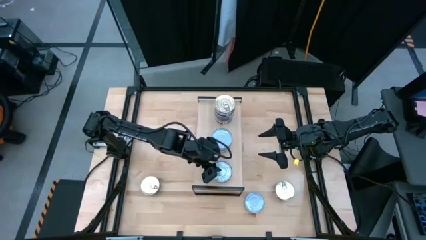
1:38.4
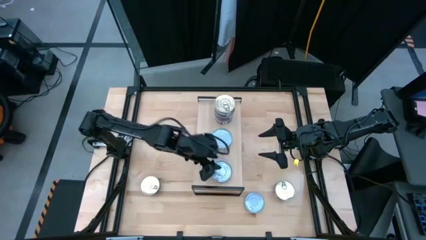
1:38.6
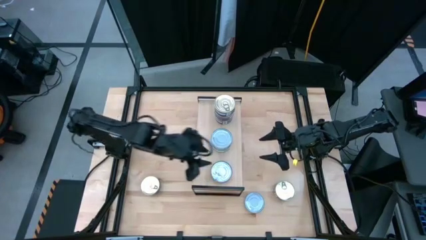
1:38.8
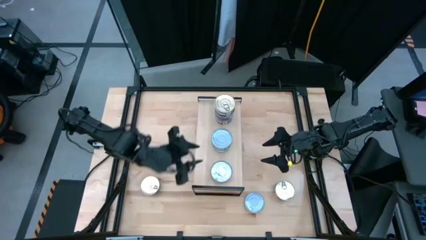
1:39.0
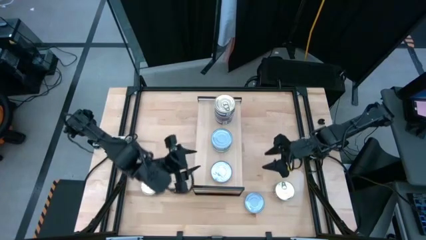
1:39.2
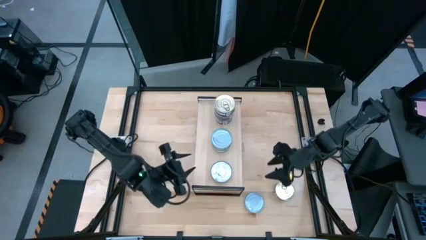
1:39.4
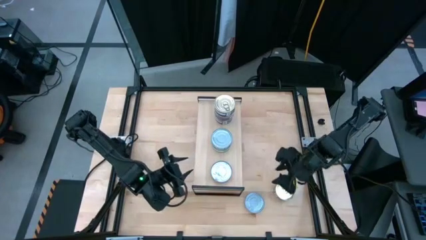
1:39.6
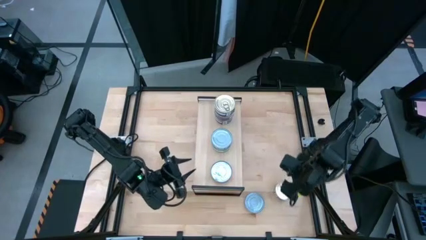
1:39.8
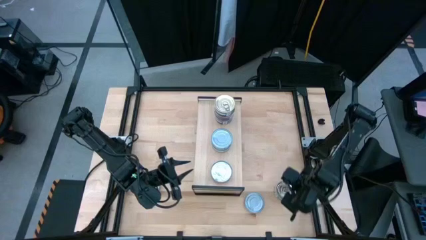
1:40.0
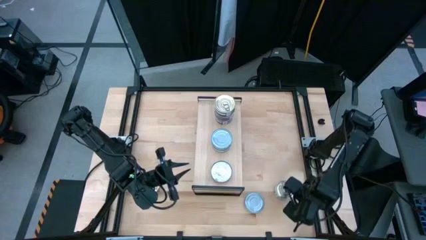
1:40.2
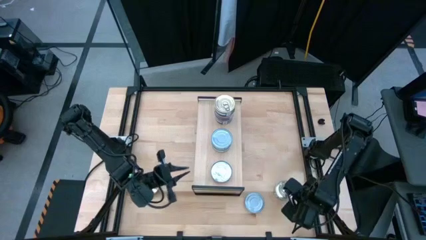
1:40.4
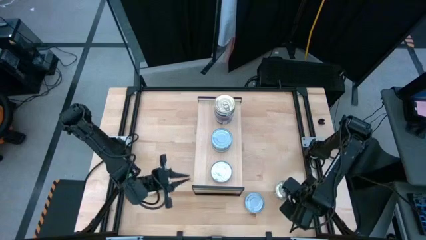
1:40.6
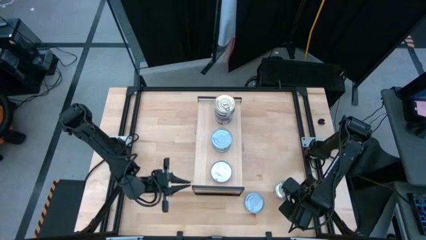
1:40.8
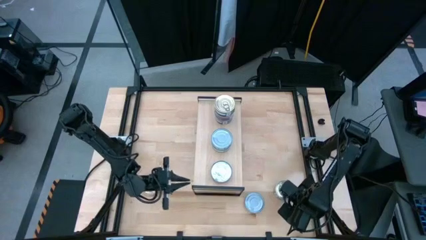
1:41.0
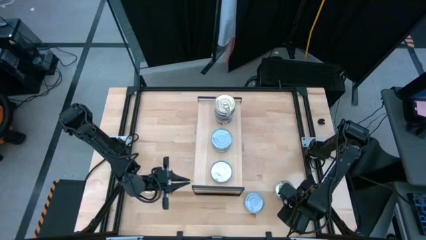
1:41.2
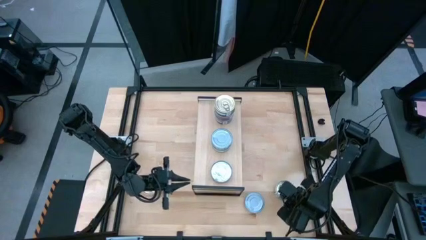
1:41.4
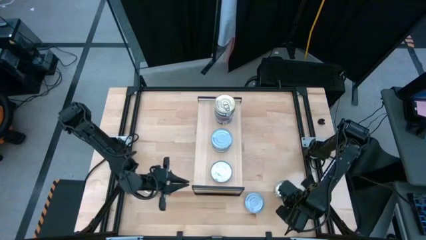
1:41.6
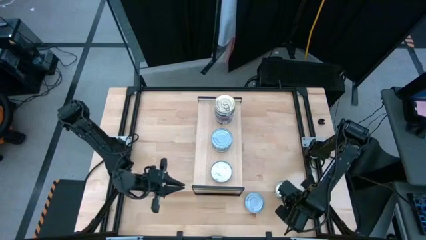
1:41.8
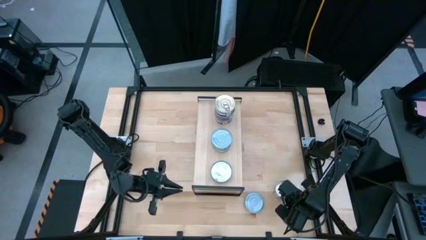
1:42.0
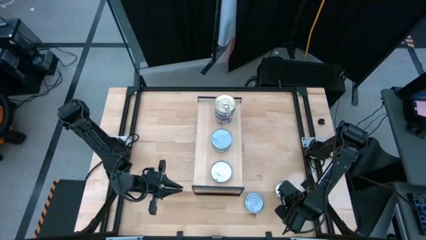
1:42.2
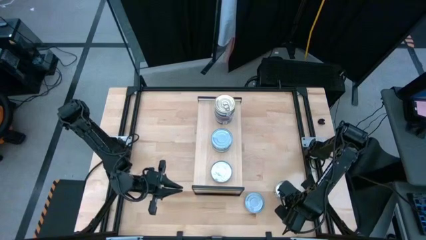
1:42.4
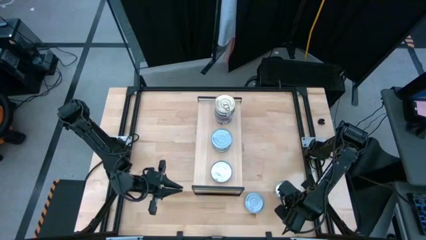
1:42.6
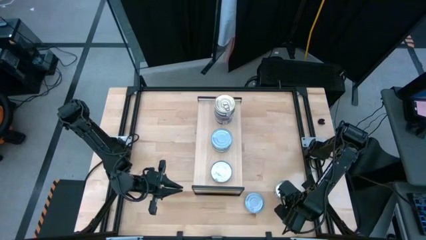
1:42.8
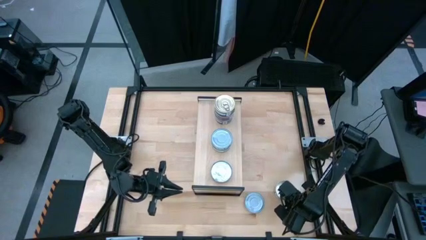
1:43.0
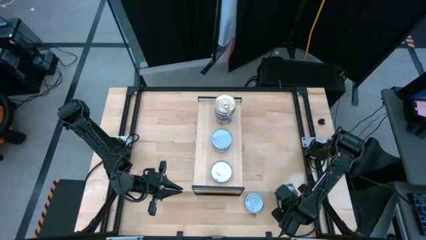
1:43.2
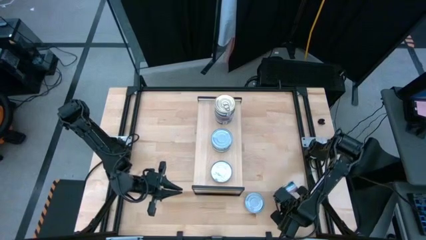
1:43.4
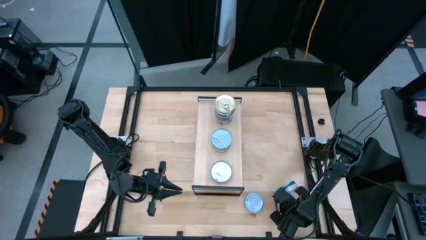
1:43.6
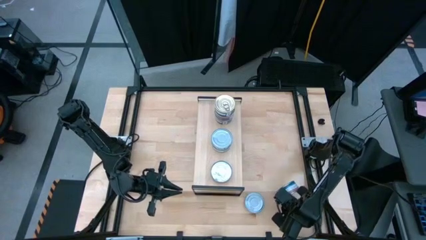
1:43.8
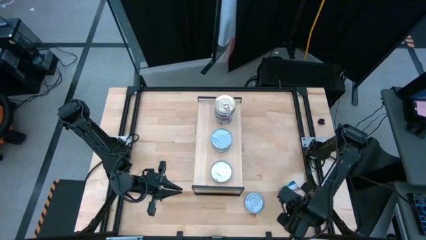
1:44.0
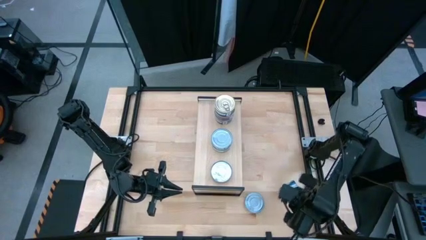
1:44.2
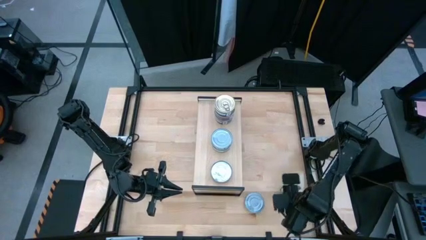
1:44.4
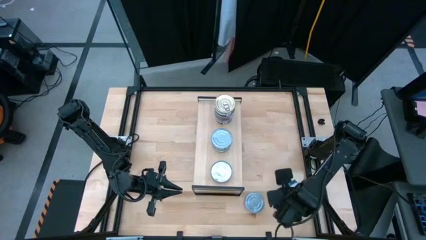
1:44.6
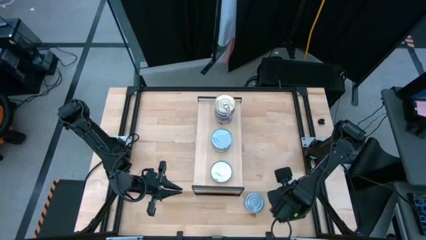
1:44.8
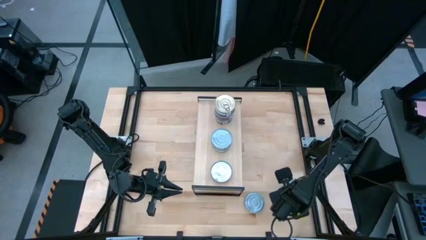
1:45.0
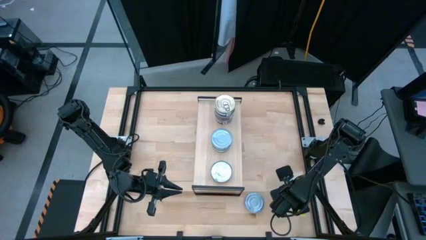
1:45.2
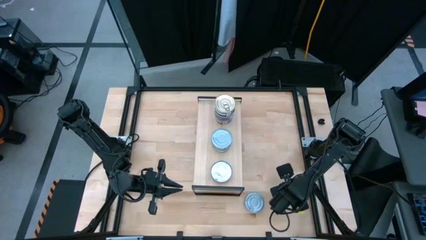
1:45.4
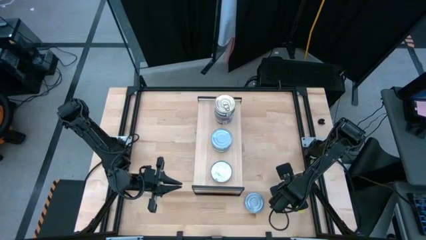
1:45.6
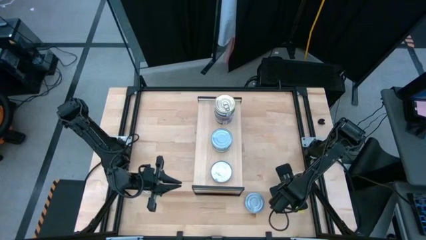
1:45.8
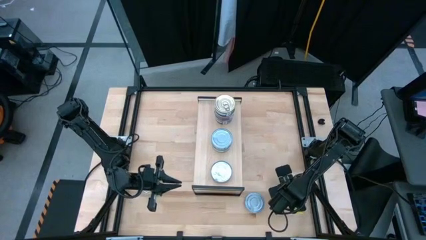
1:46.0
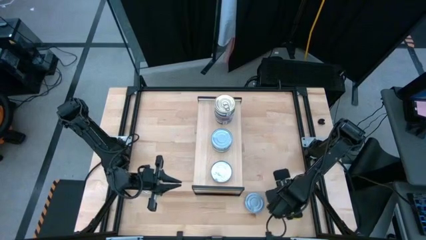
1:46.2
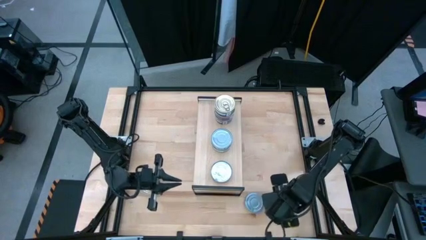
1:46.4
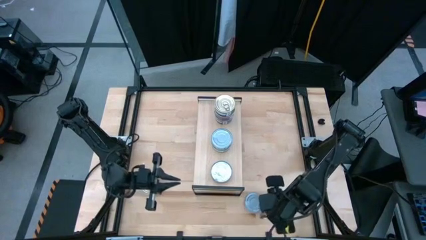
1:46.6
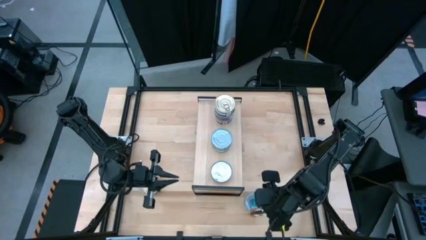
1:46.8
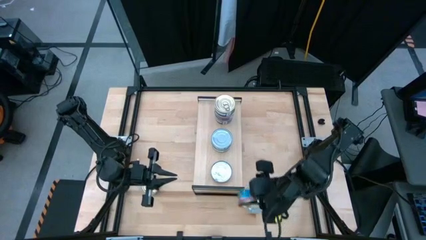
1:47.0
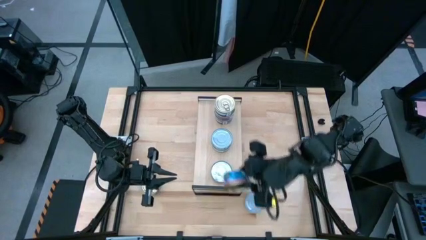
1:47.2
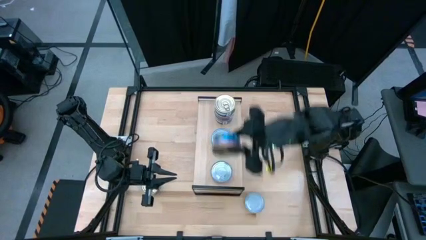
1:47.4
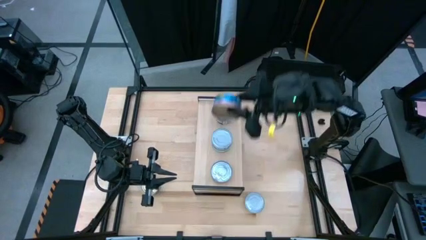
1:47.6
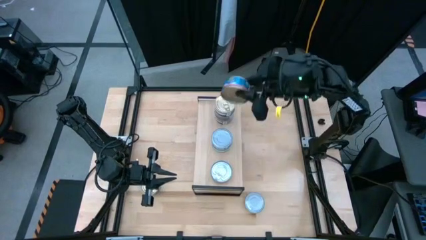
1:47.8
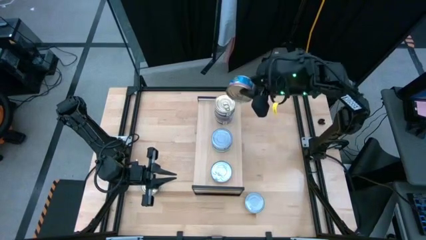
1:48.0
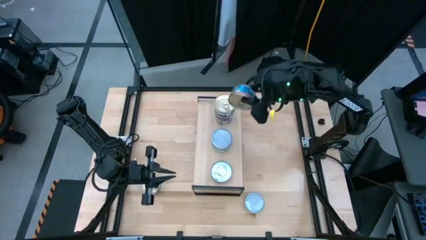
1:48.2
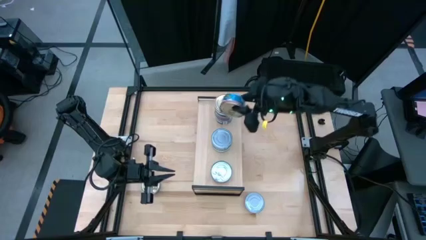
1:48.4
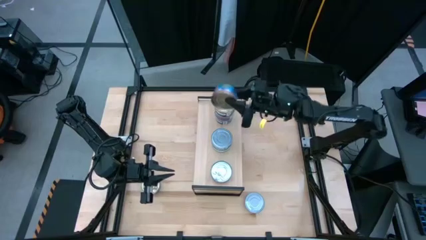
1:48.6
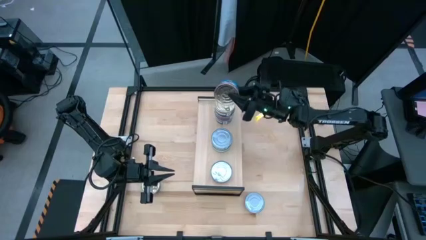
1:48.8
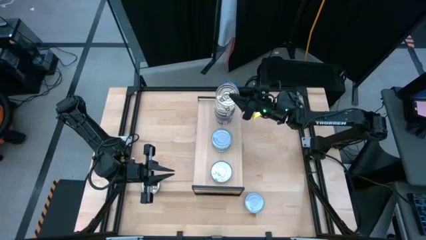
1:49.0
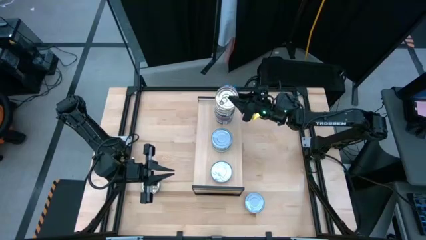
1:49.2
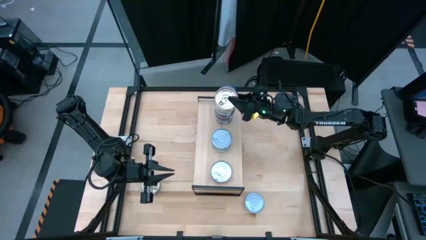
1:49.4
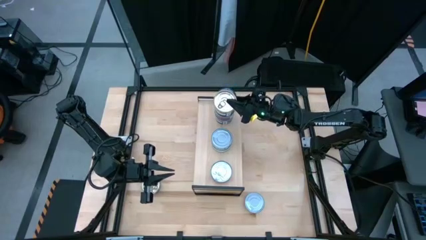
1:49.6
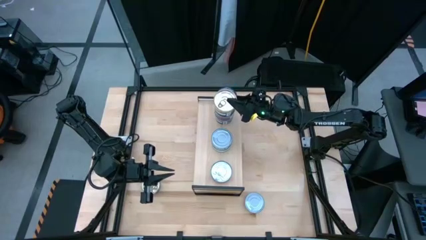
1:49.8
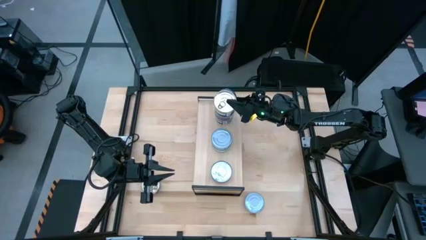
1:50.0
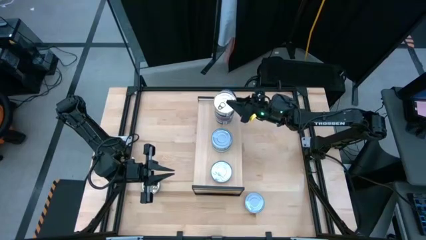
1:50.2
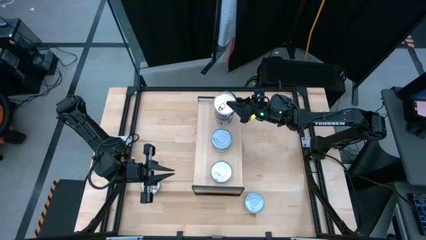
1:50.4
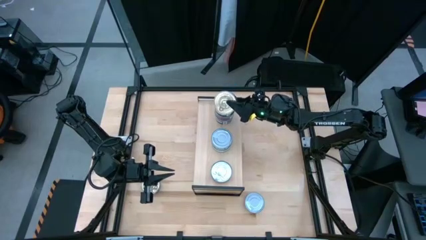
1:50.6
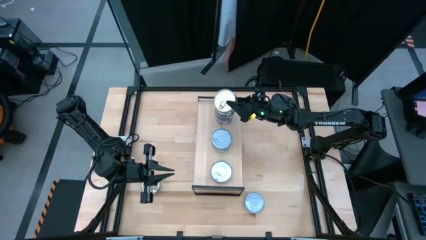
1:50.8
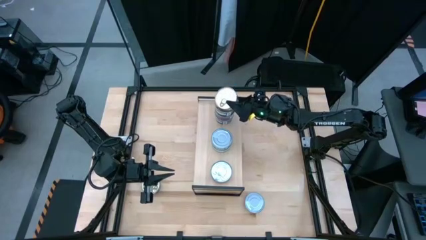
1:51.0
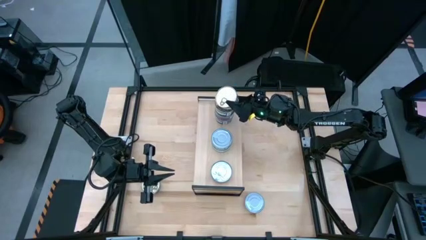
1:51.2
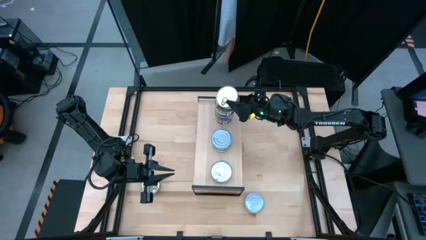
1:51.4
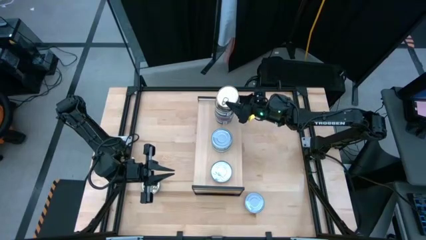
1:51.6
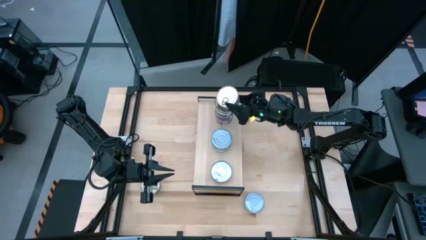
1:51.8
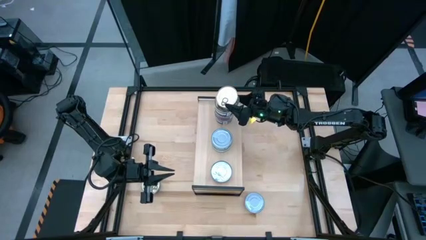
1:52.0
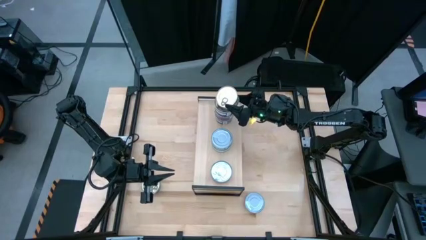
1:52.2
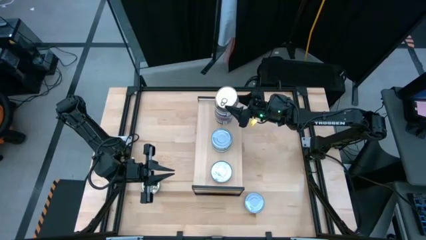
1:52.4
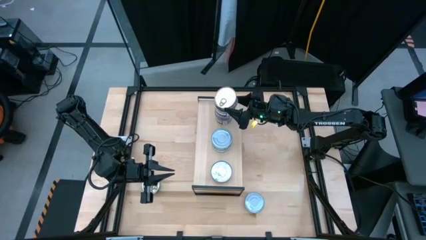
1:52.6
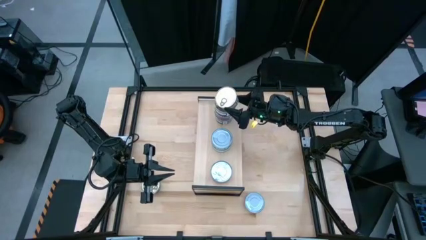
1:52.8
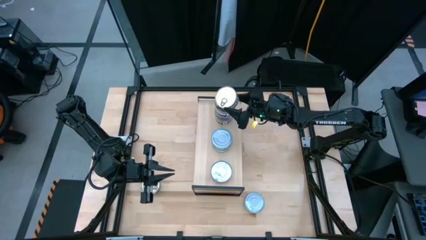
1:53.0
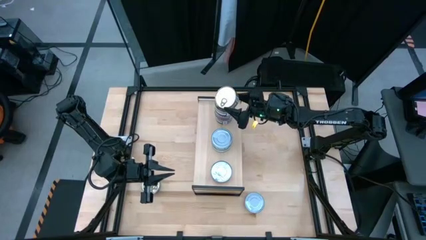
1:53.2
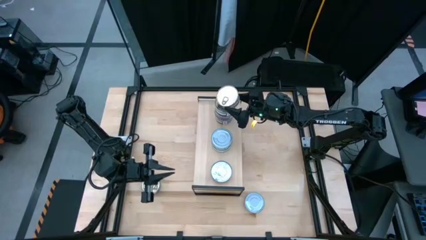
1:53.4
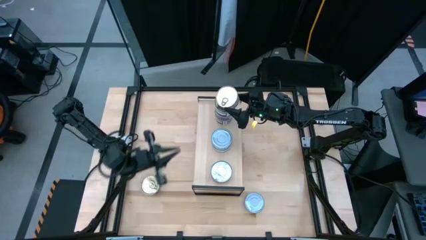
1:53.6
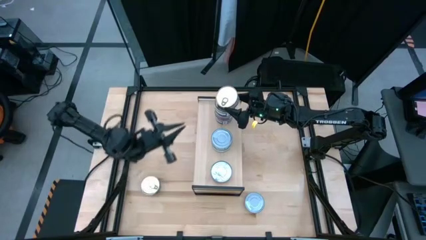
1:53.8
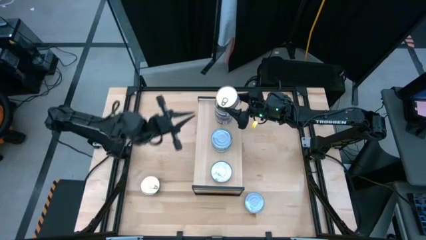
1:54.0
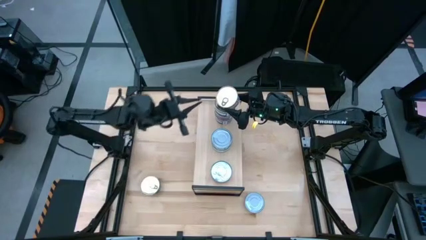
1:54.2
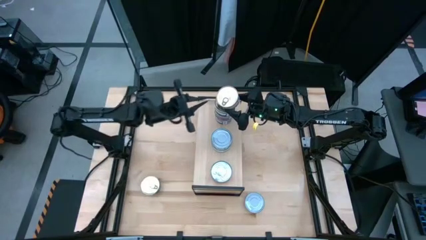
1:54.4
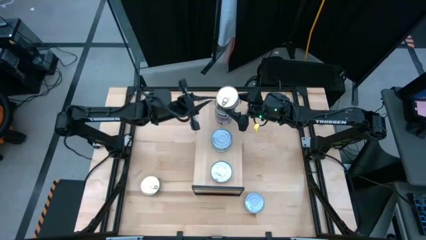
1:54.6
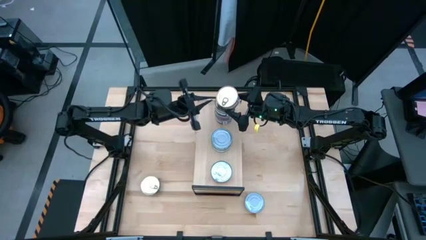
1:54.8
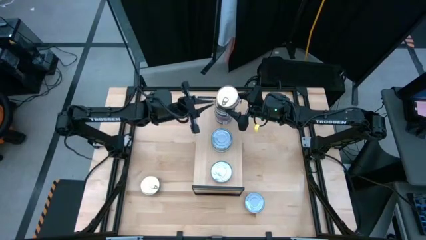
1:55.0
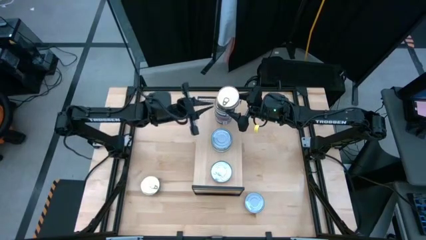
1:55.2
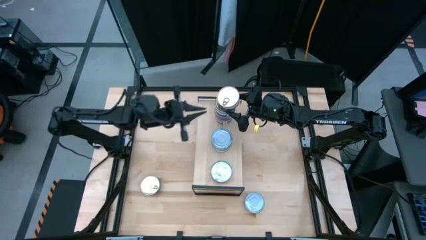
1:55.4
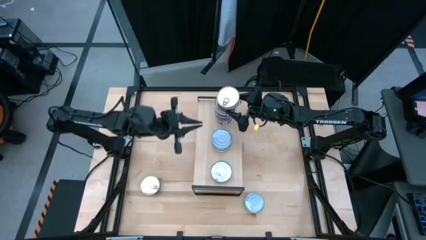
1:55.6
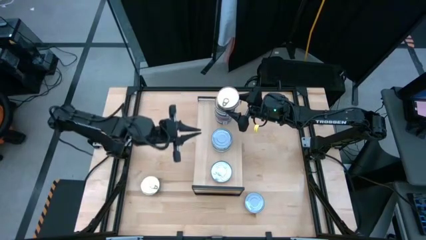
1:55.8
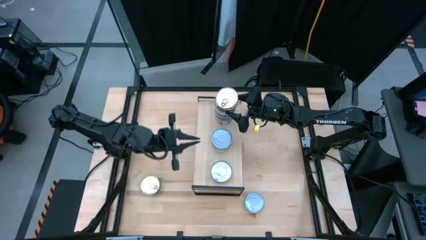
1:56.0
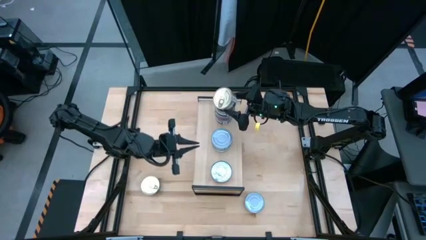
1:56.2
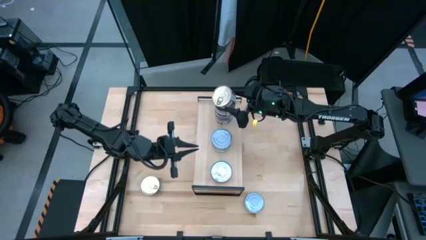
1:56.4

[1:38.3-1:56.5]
Task: Stack canned seafood by type on shelf
Stack the blue pink tuna can on top of the blue pink tuna can on the shelf
